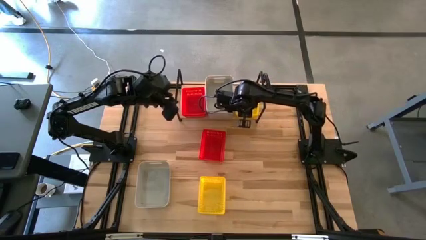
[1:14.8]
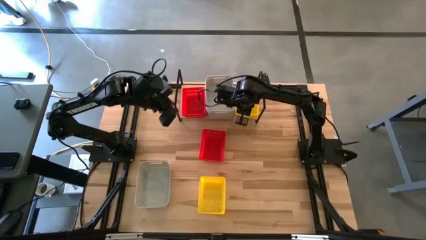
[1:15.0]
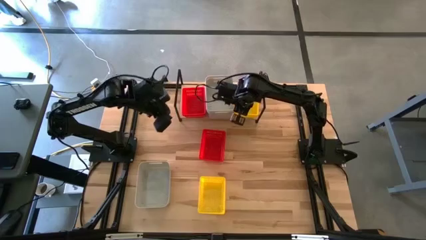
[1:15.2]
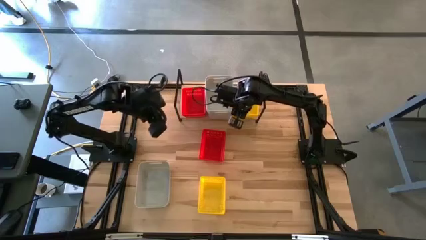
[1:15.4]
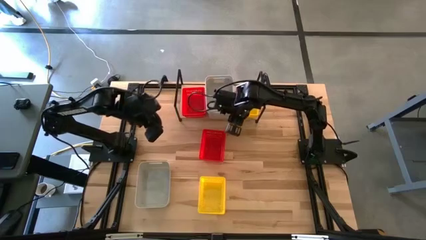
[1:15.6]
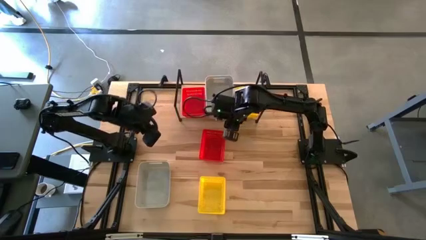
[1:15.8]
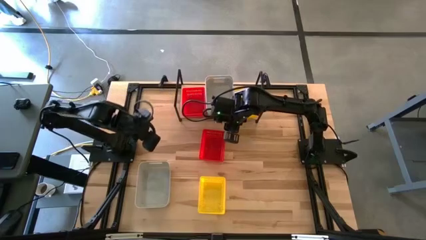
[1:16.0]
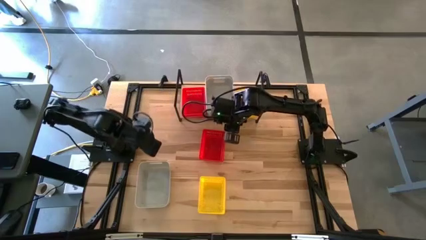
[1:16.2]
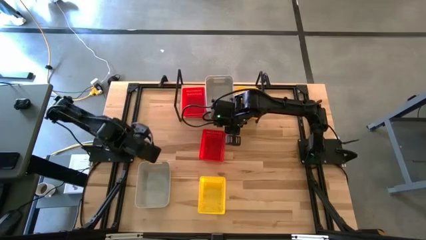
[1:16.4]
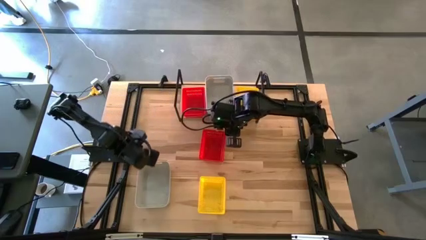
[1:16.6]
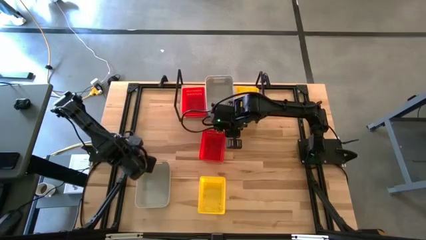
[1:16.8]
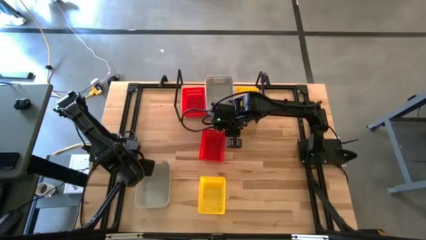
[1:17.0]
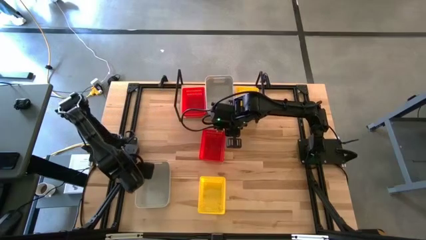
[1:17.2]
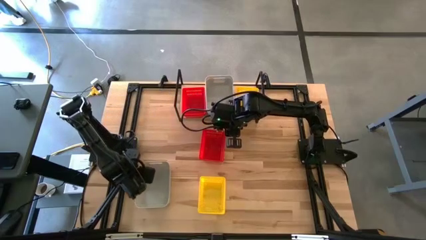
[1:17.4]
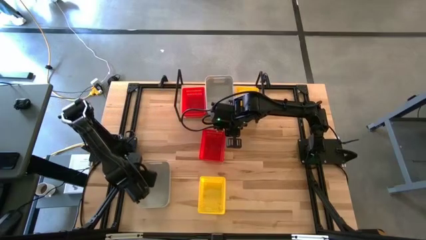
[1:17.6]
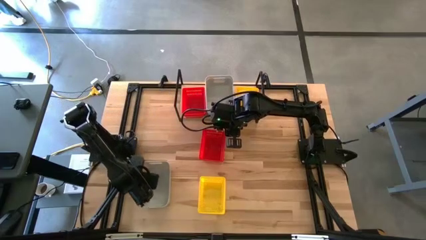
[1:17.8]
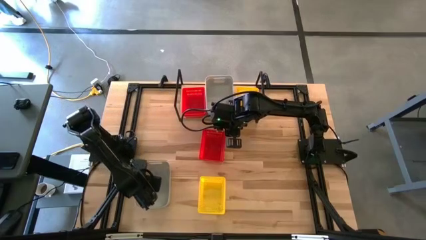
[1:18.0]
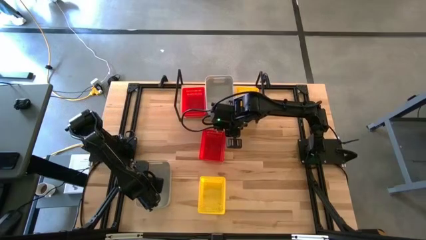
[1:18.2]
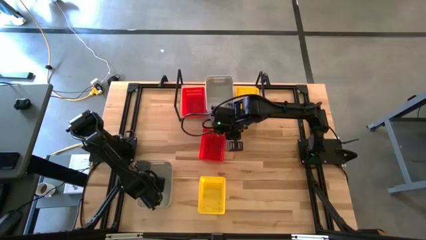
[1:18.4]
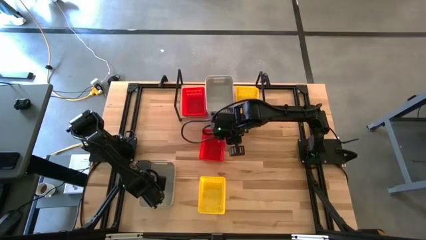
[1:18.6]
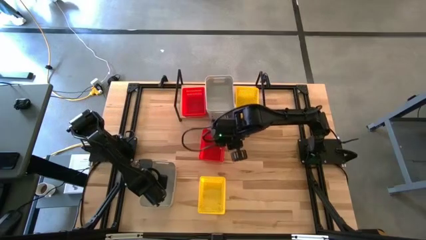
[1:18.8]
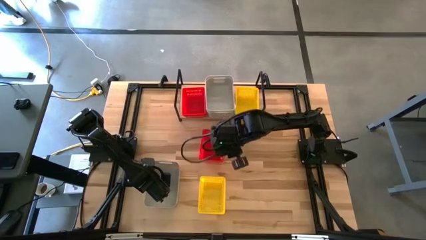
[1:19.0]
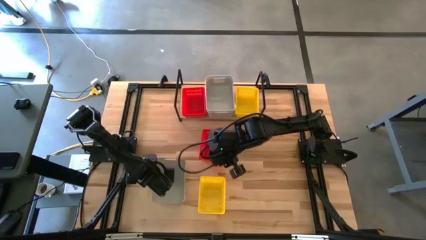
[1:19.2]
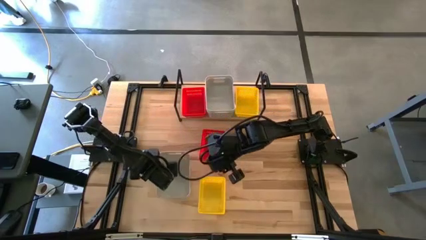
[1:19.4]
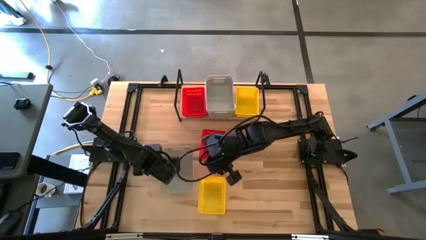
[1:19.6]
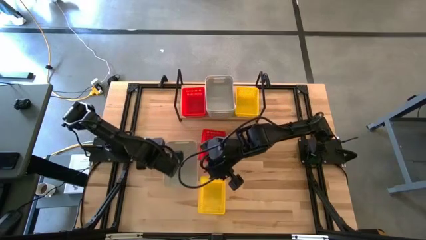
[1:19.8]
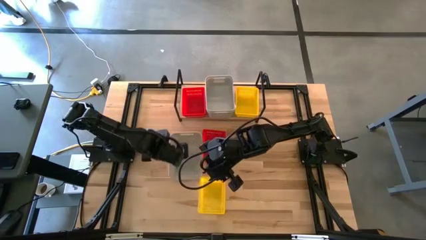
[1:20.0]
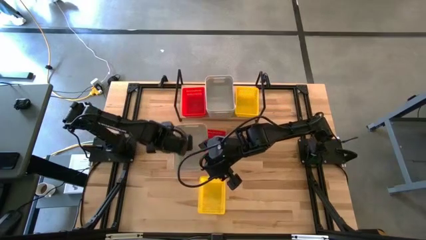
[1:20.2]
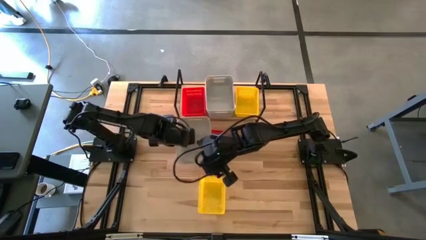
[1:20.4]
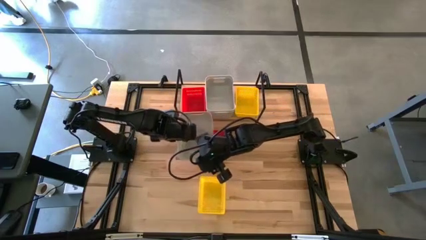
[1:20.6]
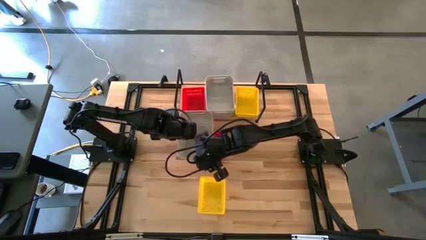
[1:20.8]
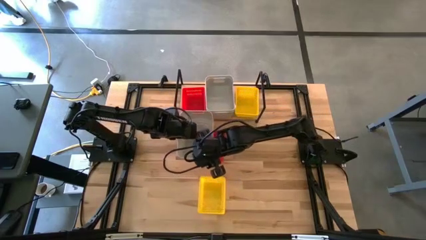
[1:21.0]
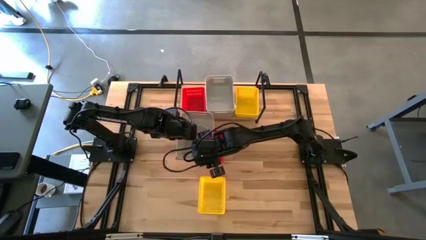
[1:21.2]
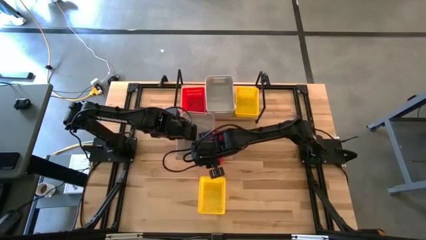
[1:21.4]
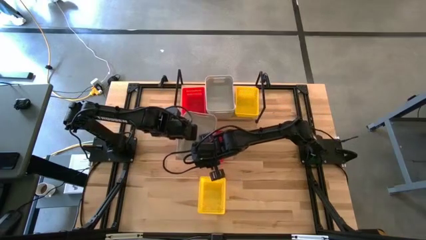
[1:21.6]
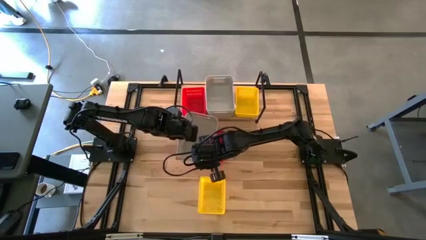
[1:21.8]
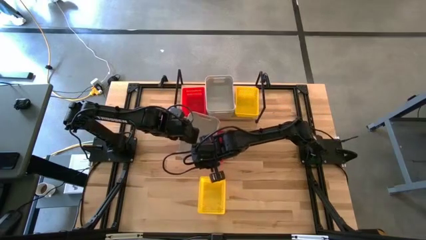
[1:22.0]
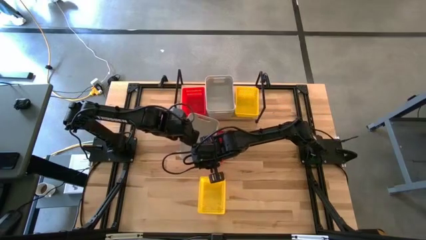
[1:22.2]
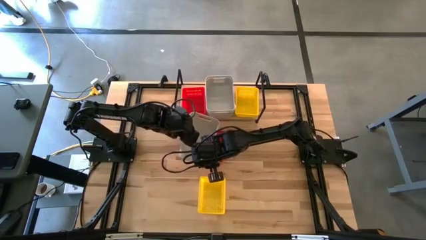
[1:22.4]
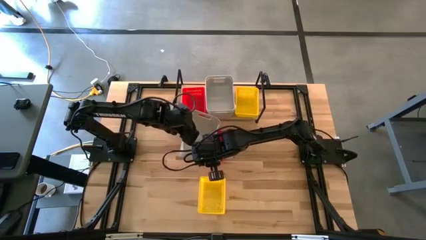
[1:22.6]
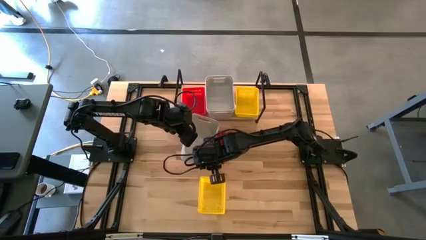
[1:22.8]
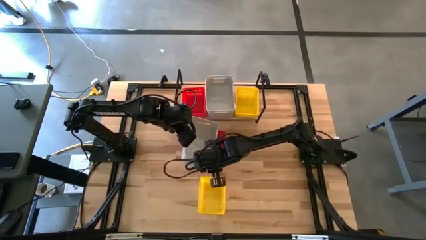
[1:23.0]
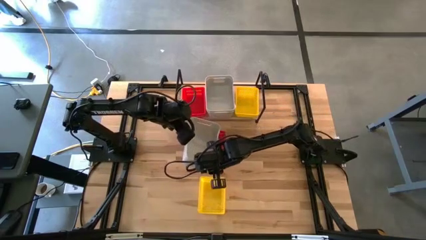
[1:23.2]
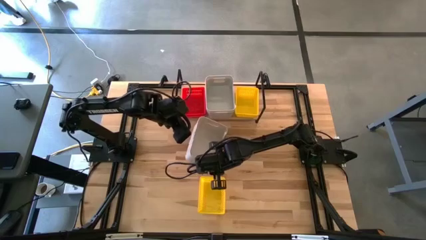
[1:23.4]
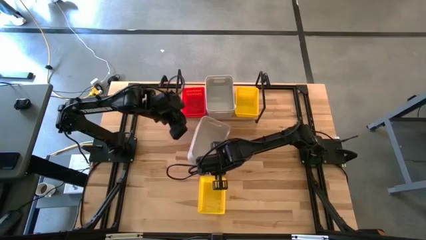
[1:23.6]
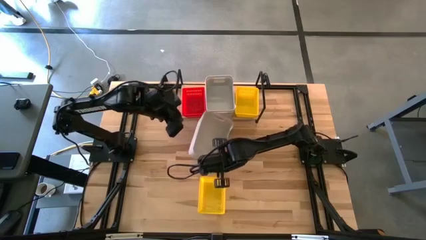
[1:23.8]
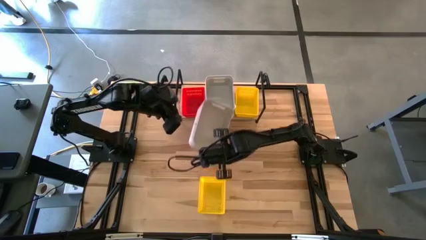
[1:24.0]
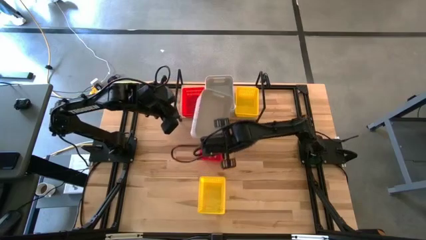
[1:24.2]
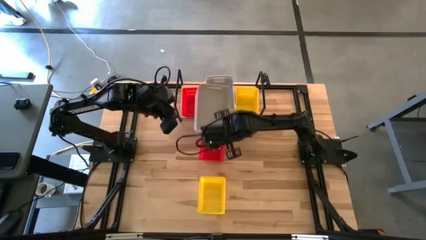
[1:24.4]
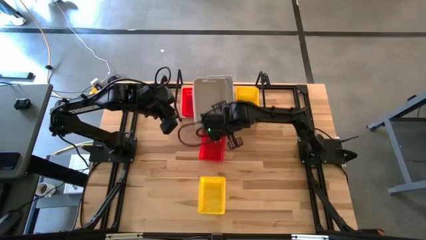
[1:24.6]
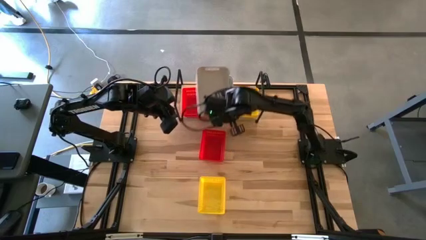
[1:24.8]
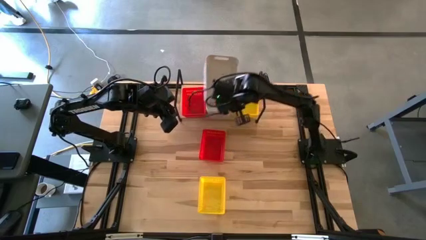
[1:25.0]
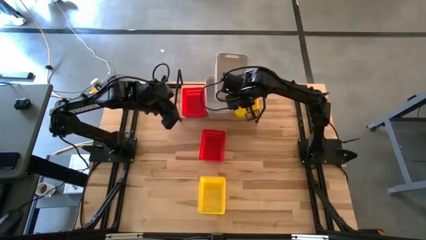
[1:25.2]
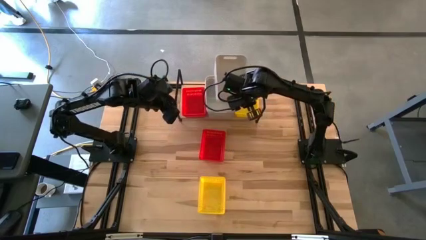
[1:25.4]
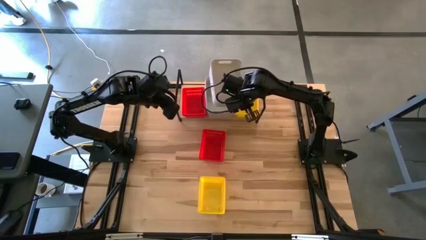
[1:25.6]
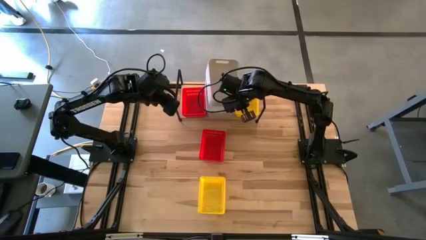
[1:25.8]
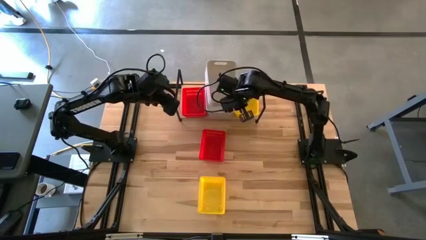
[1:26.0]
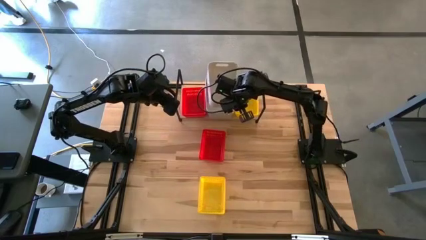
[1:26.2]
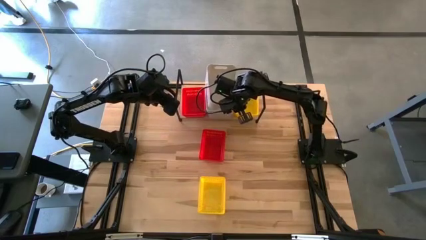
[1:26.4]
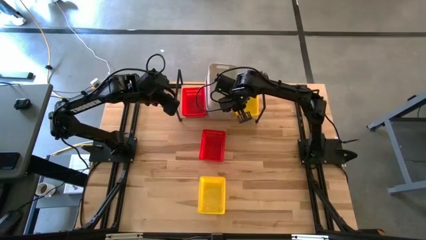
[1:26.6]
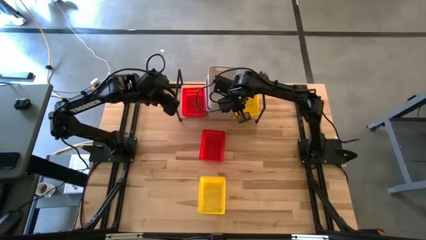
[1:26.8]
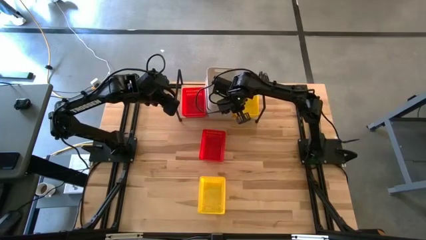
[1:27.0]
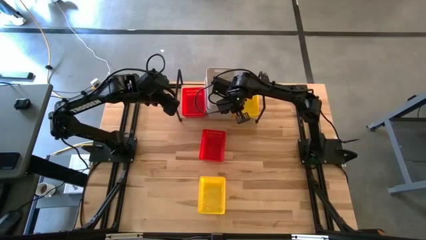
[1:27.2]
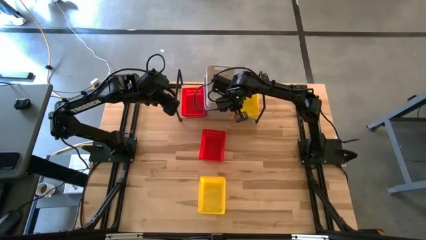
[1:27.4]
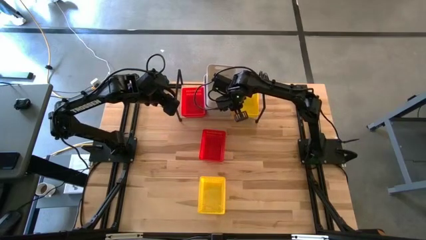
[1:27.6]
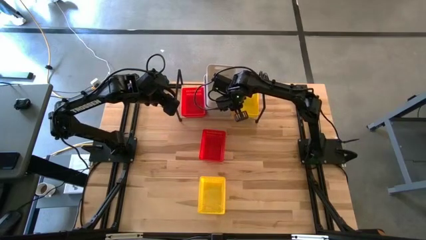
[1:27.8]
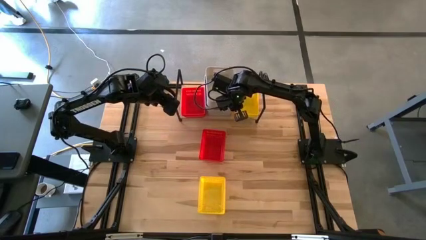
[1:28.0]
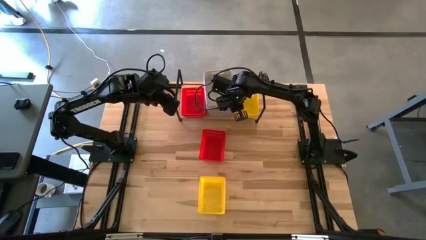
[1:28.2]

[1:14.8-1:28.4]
Task: Stack baskets on shelf by color
Stack the gray bin on the top of the other gray bins on the shelf

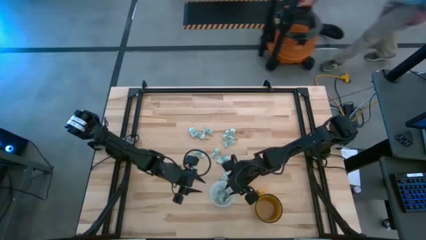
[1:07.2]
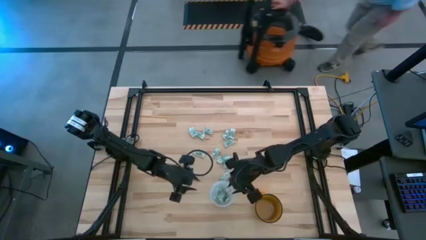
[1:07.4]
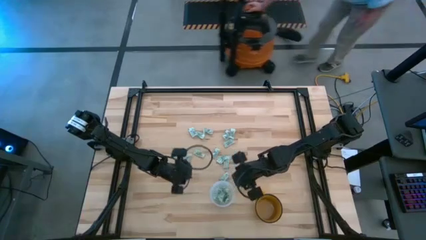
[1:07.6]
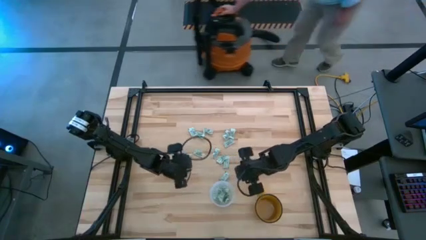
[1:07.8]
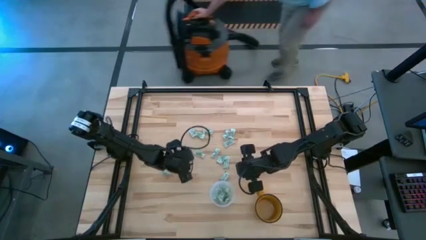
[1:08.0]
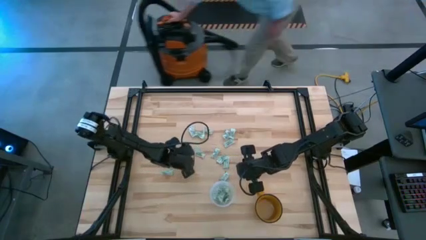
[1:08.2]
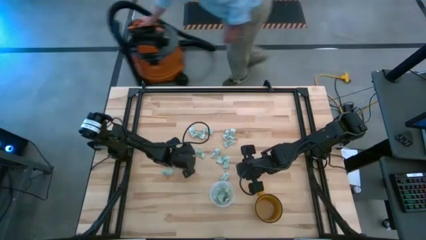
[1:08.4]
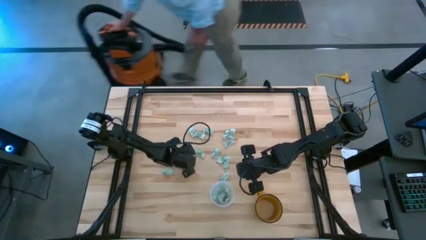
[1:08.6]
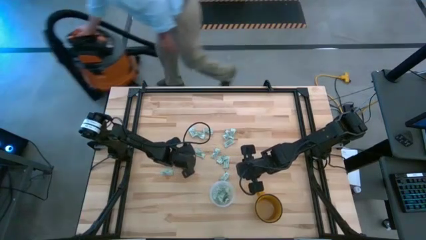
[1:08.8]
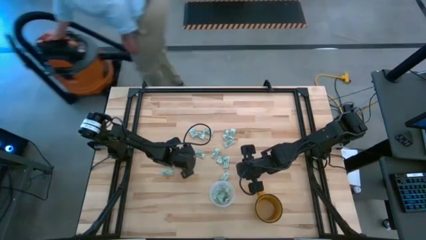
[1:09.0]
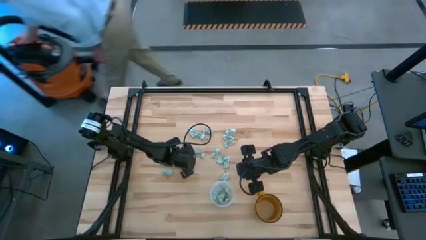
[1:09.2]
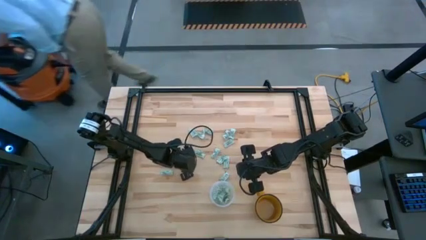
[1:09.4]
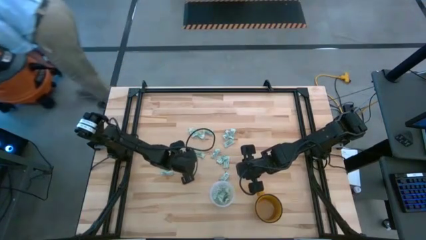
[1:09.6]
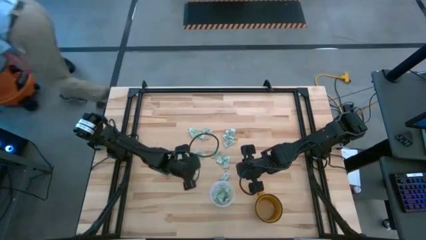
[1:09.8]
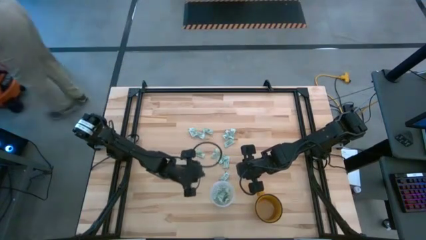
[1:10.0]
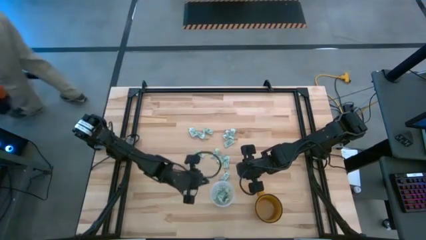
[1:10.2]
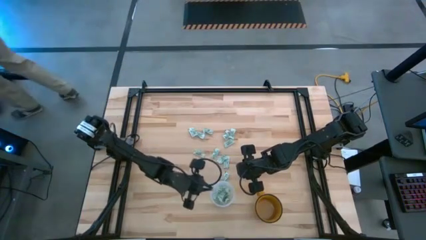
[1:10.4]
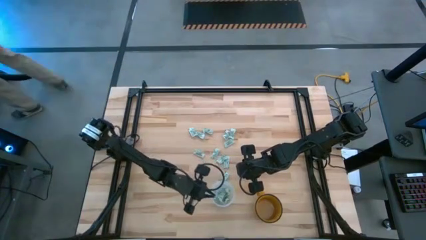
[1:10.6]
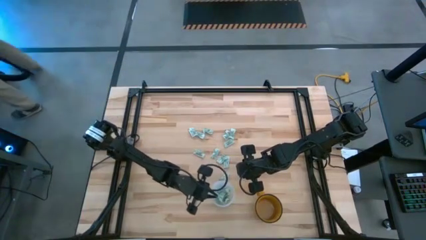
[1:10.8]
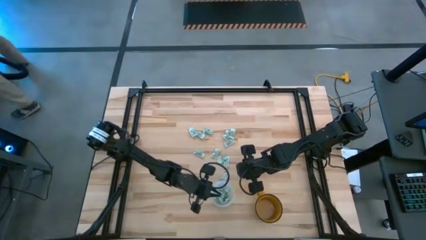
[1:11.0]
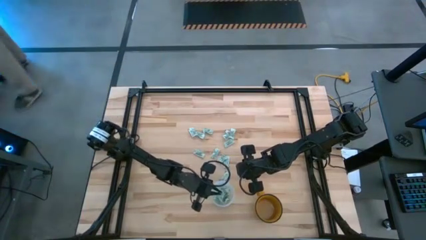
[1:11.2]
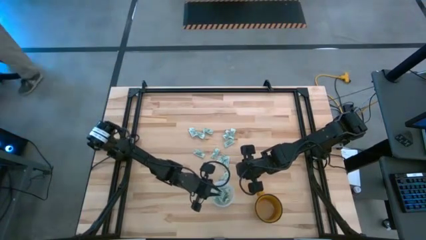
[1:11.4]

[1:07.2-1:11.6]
Task: Pick and place Stevia / Truvia into bins
Put the stevia packet into the transparent bin
